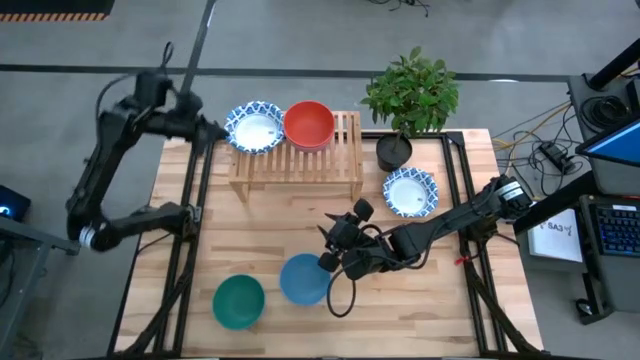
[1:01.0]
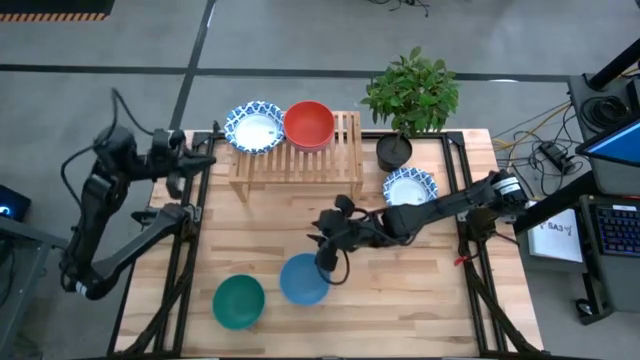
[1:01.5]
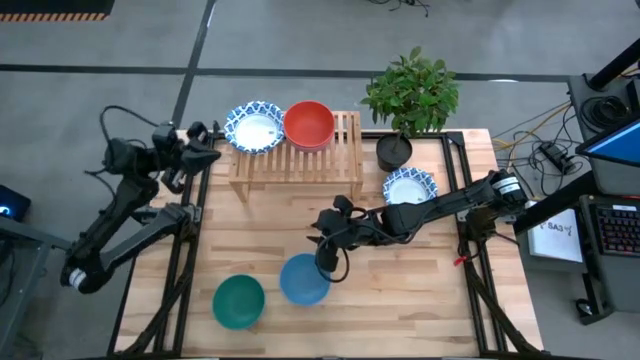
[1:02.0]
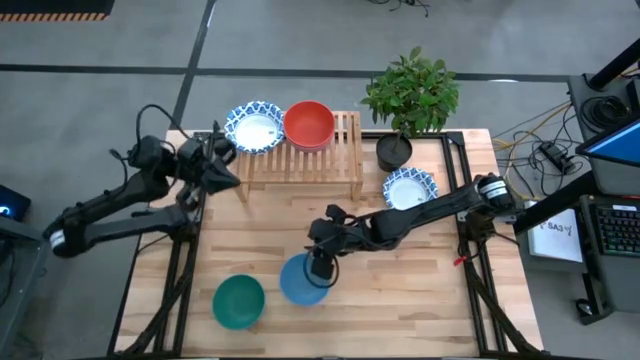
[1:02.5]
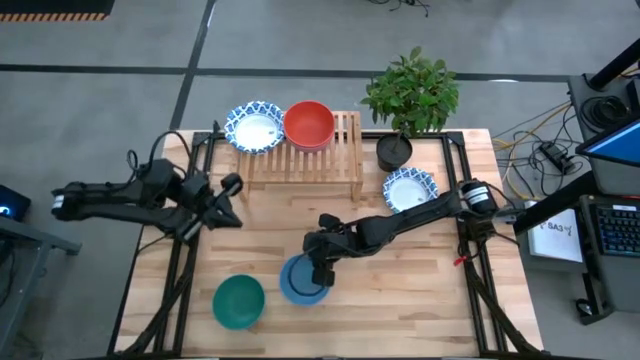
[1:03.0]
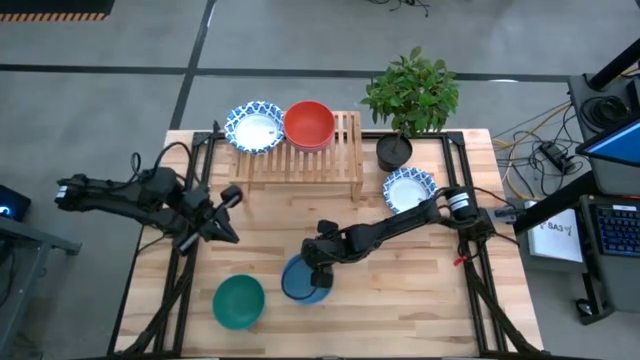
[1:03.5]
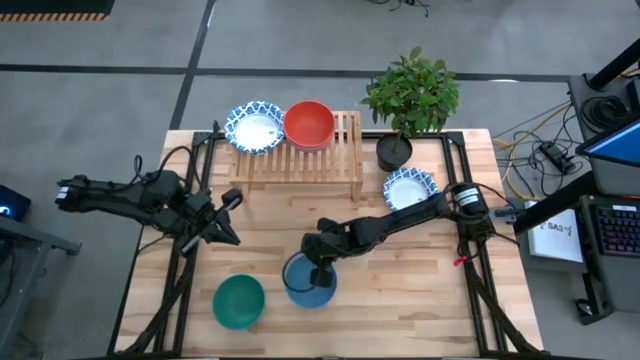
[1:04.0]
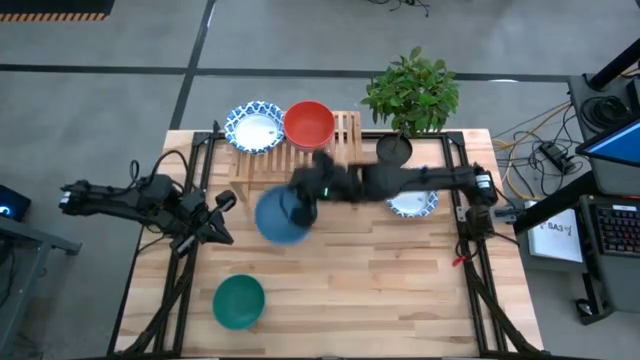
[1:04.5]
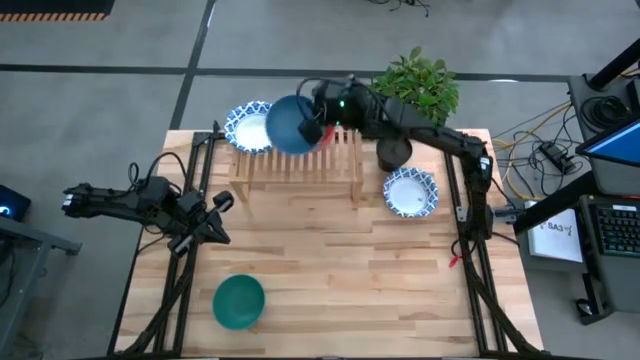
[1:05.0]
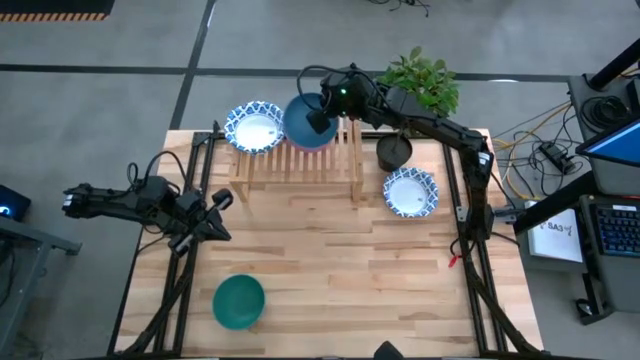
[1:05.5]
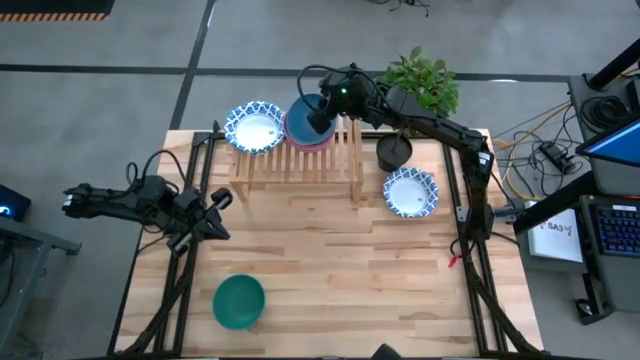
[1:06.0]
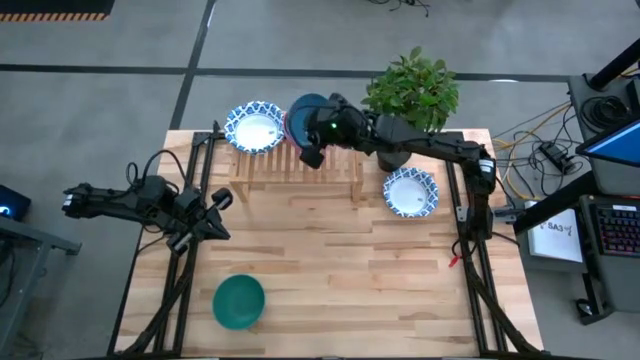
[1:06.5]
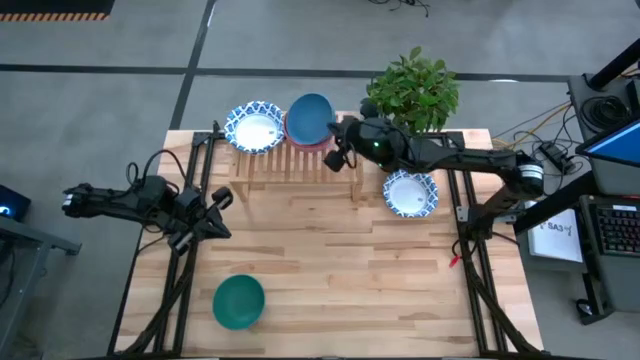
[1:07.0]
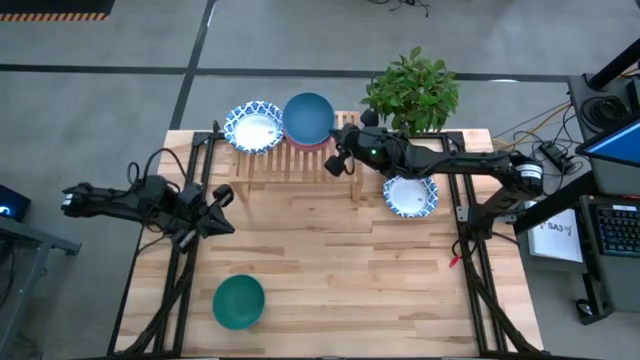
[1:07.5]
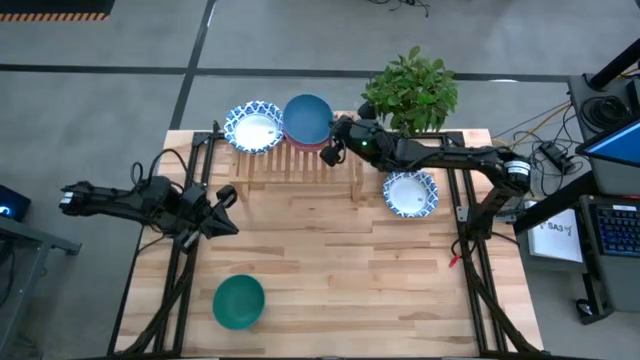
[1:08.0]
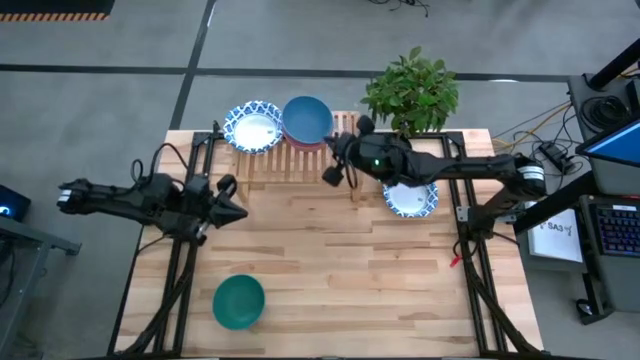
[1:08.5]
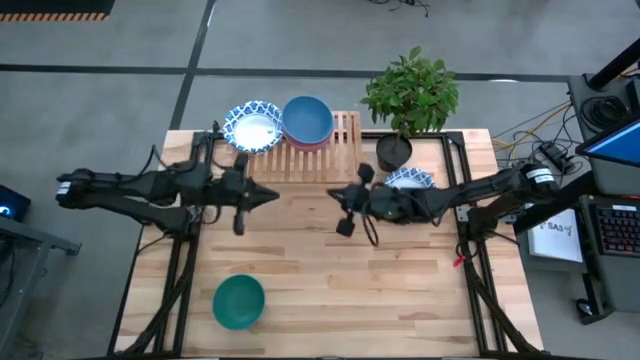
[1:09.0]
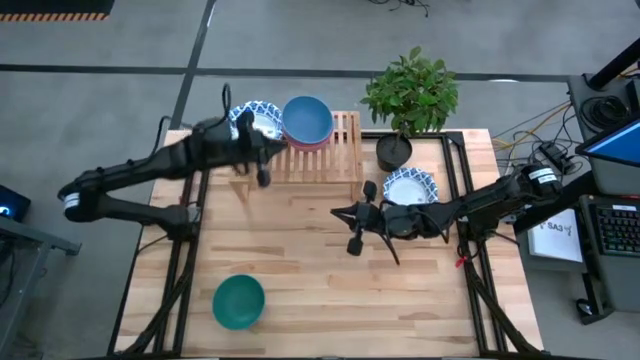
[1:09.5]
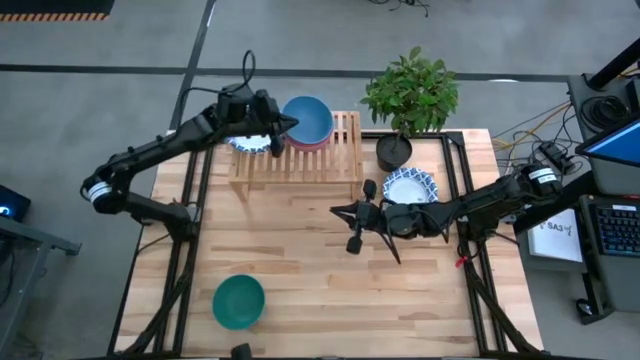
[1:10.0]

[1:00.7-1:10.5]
Task: Place and stack bowls onto a shelf
Stack the blue bowl on top of the orange bowl on the shelf

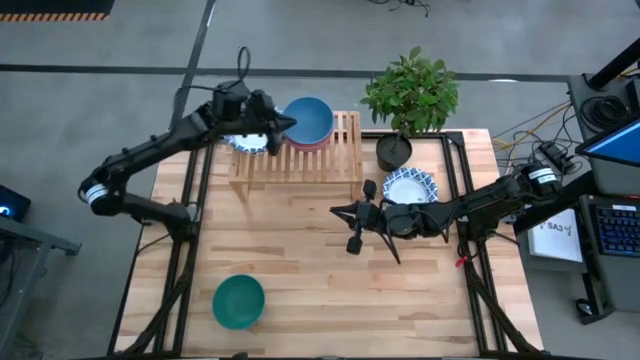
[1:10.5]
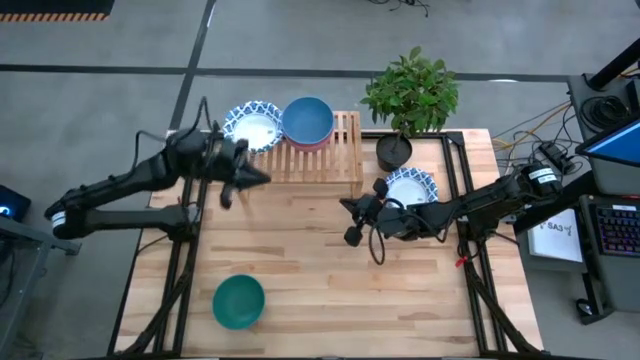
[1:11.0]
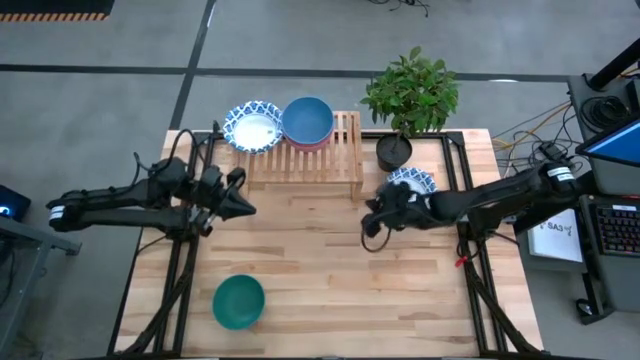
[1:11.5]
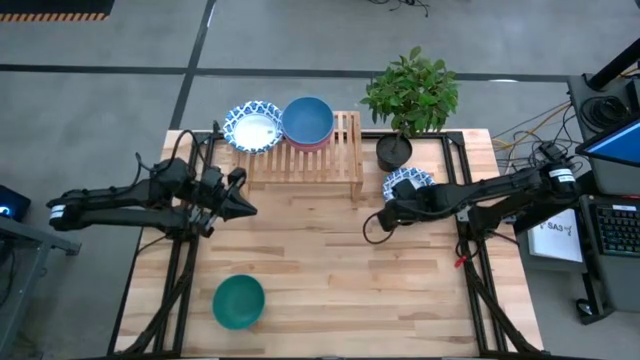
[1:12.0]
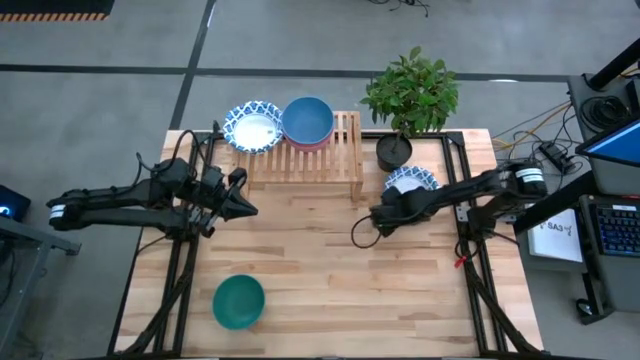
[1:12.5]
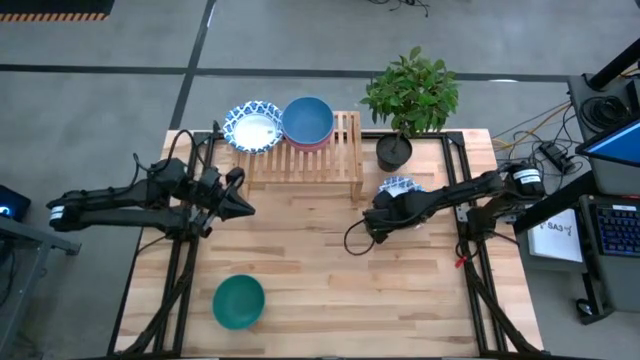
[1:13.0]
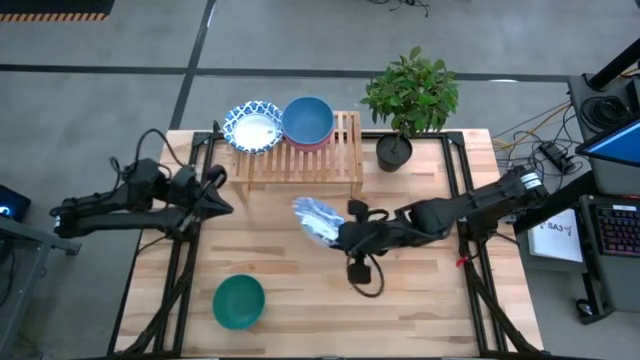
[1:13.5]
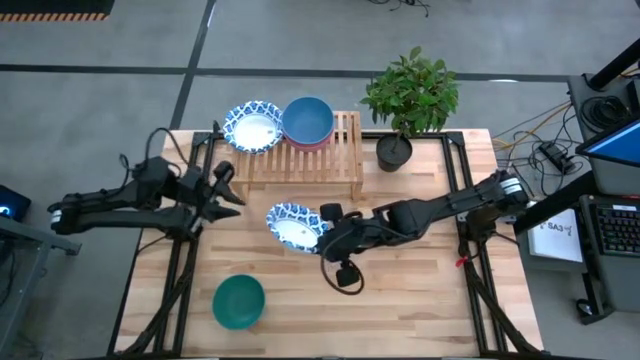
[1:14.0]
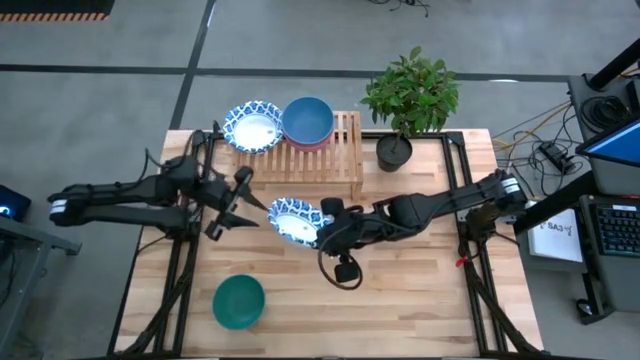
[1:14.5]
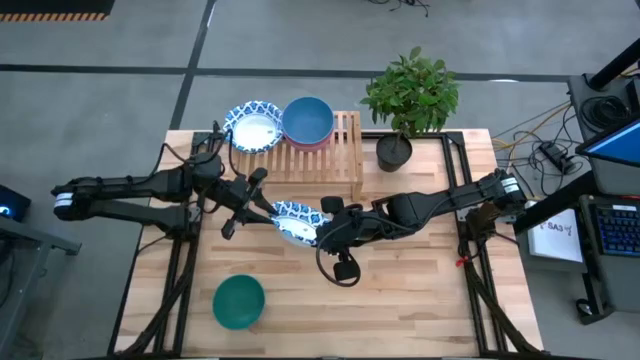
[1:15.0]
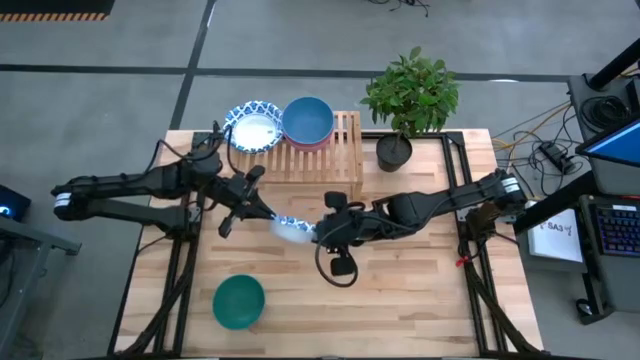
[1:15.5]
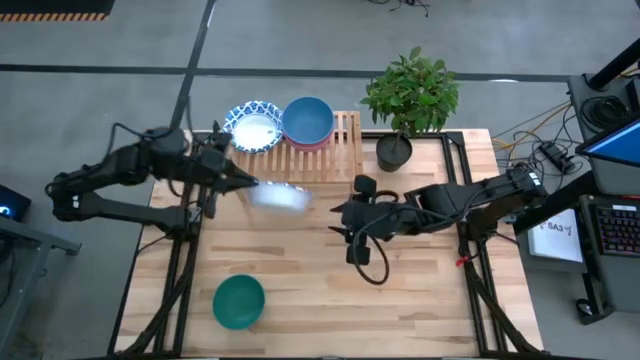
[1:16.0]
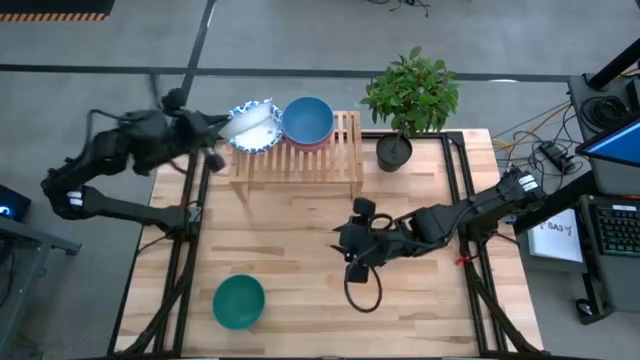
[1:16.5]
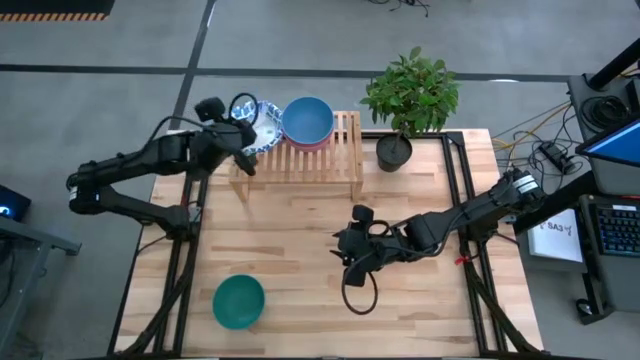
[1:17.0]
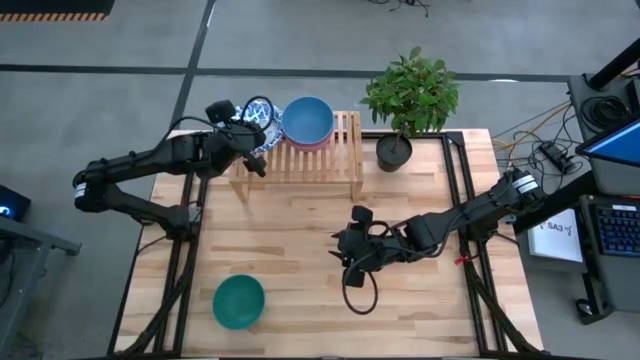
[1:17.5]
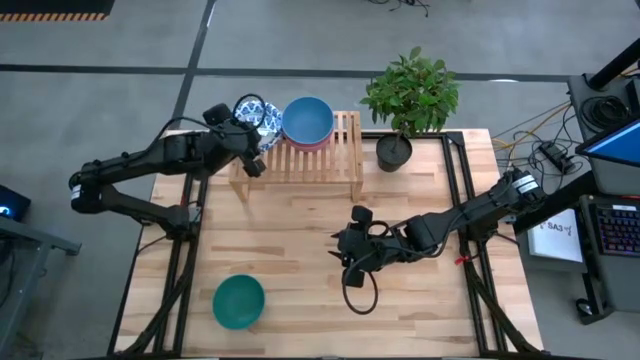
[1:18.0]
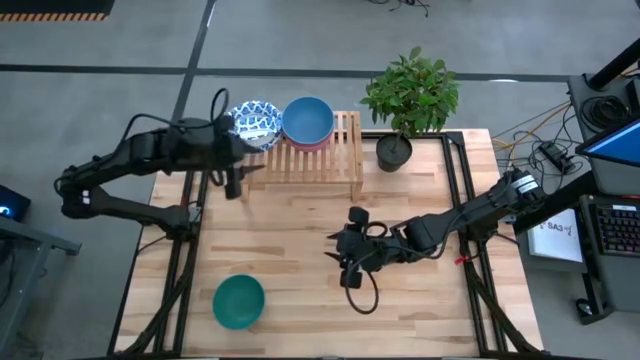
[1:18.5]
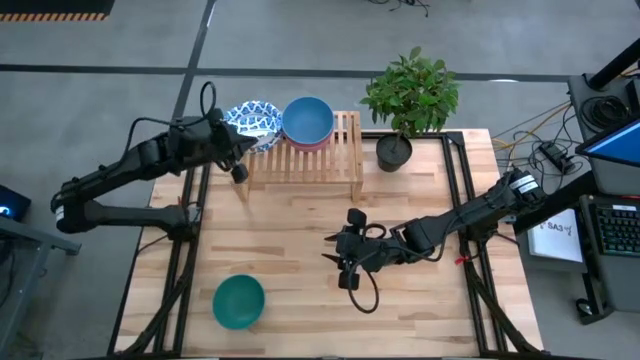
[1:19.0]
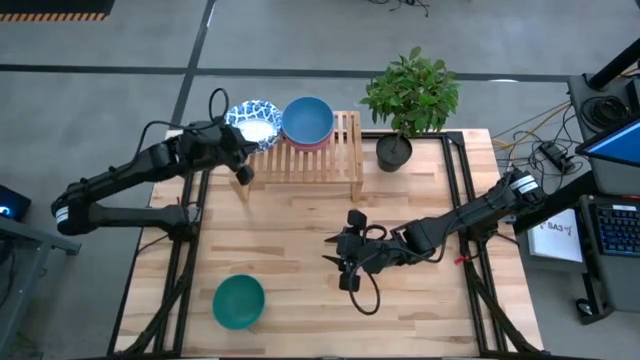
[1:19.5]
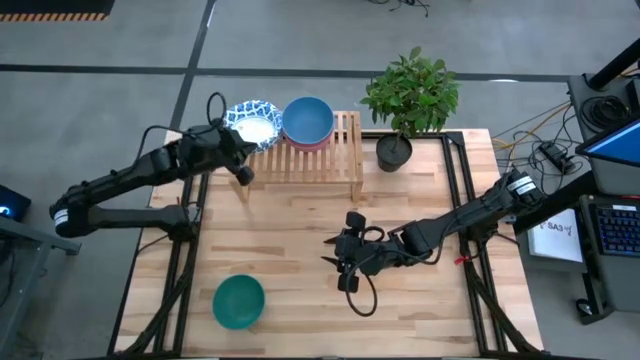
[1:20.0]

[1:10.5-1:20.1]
Stack the white patterned bowl on top of the white patterned bowls on the shelf

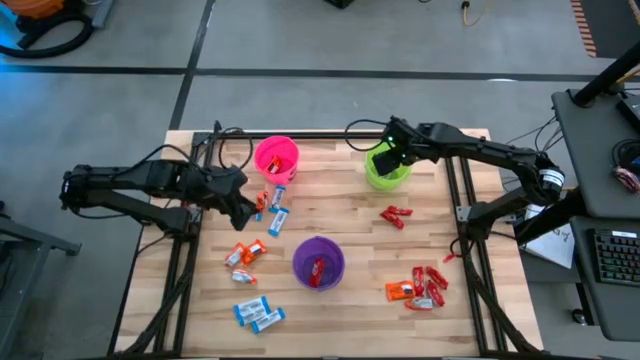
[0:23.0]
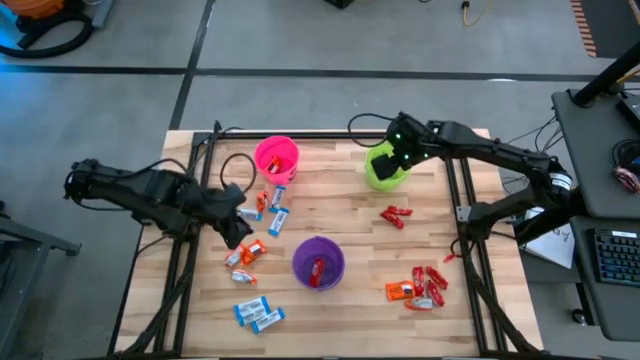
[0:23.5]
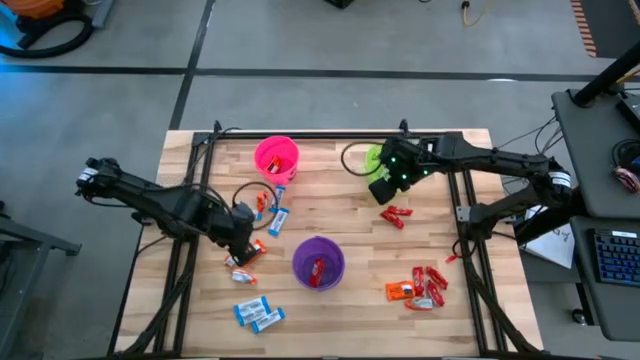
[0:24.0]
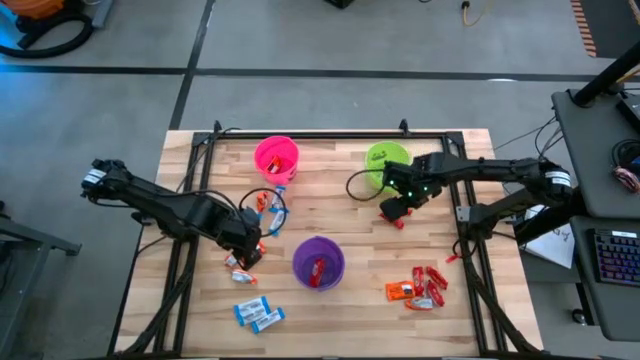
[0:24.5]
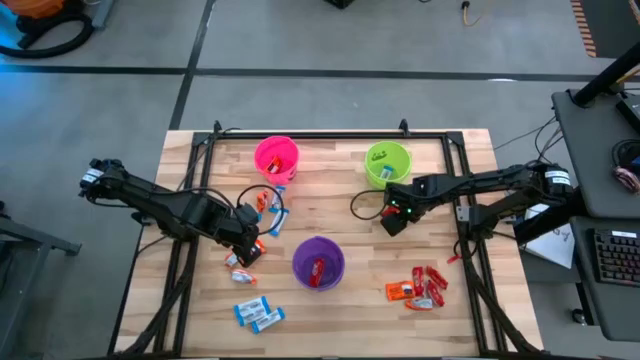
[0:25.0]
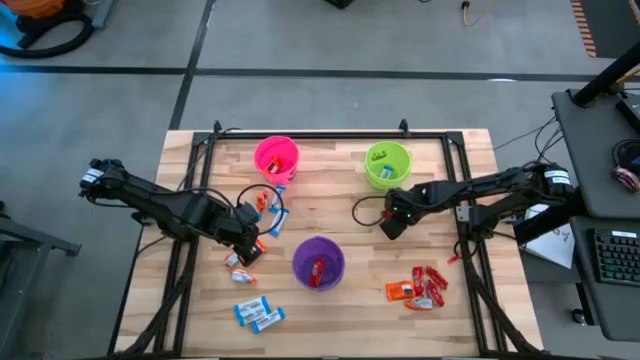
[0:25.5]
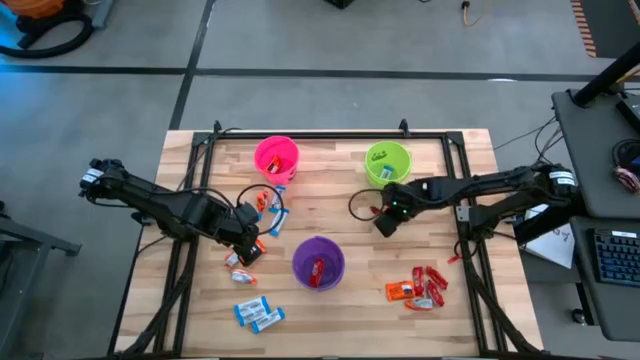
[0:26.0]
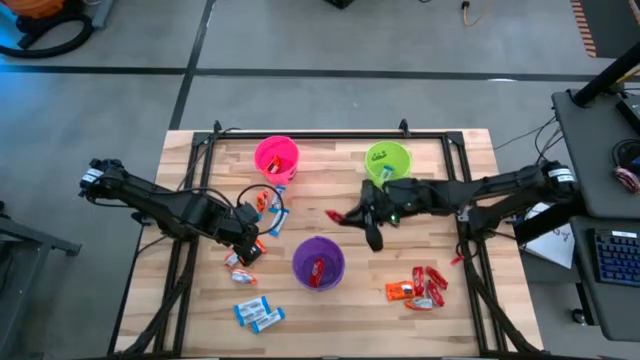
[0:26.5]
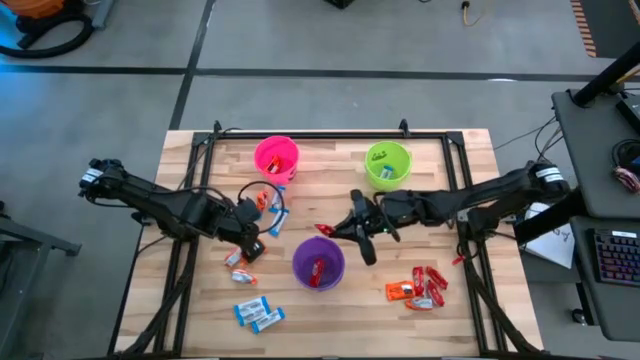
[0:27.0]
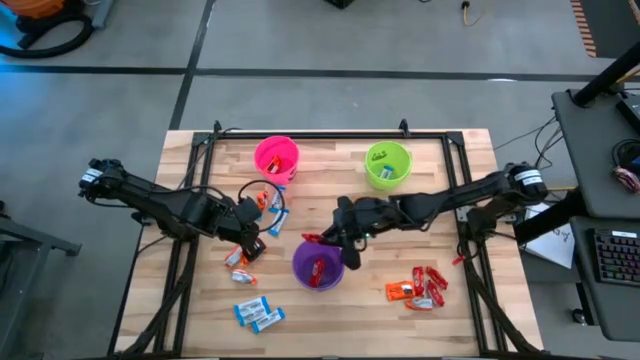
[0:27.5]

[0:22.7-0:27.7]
Task: Sort candy
Put the red chocolate into the violet bucket
